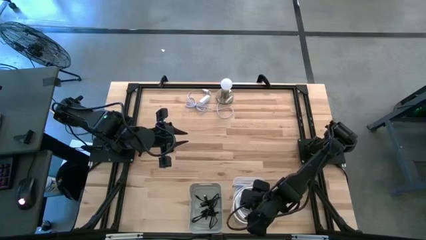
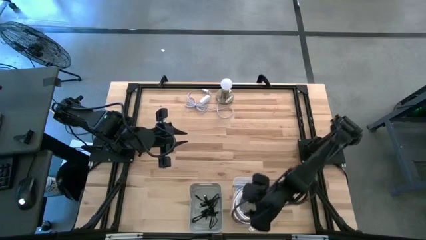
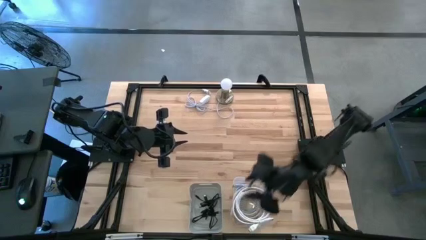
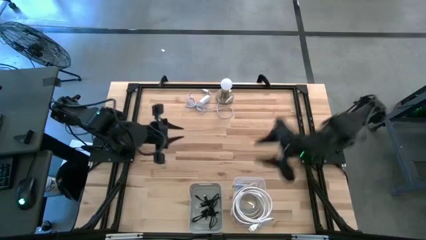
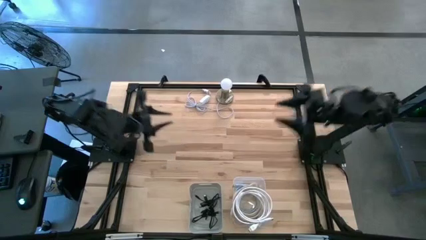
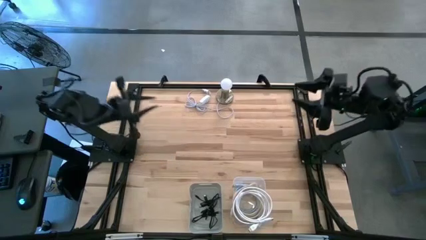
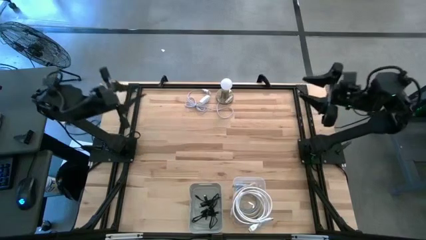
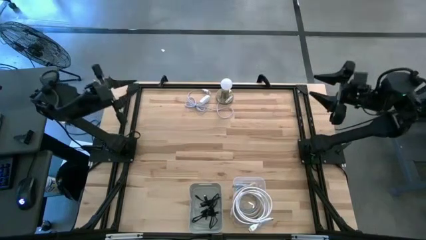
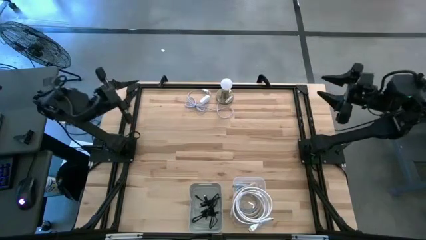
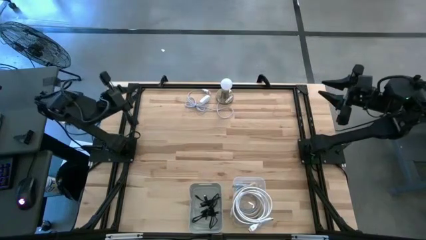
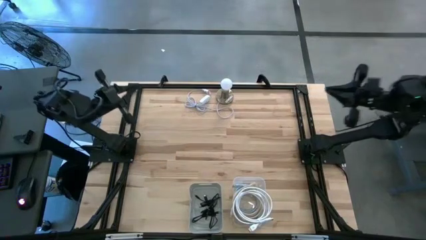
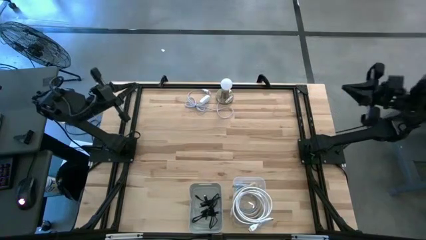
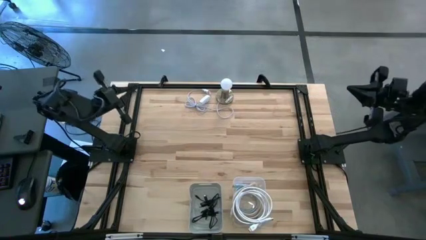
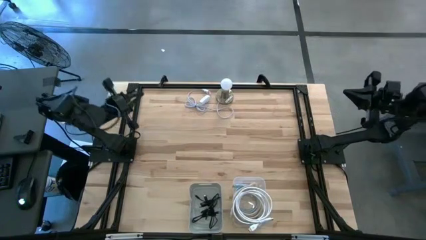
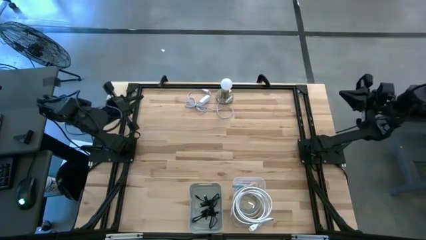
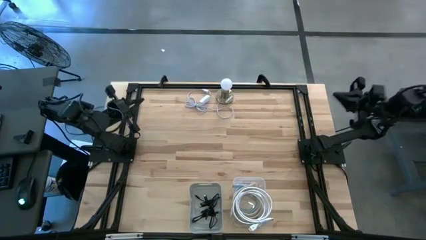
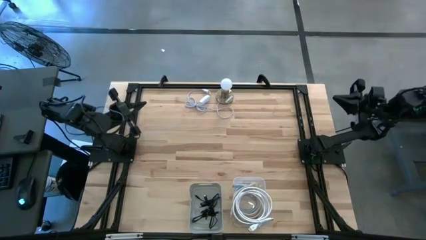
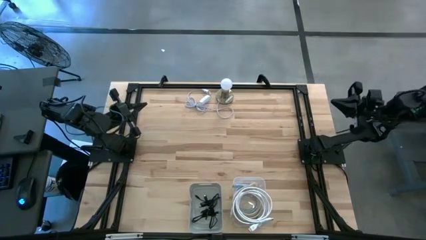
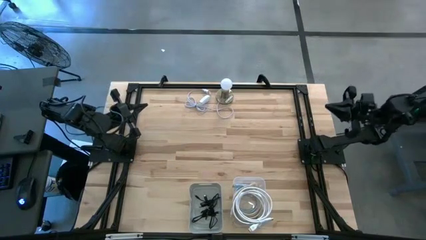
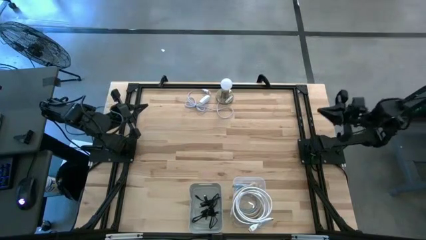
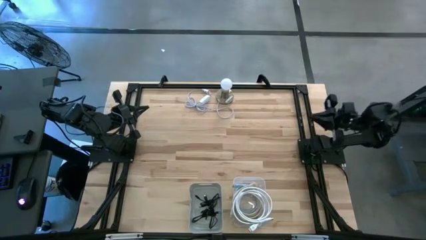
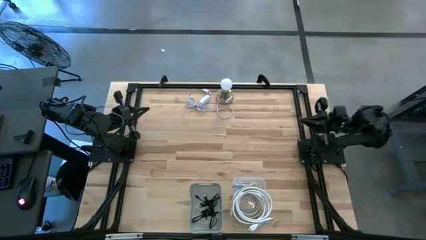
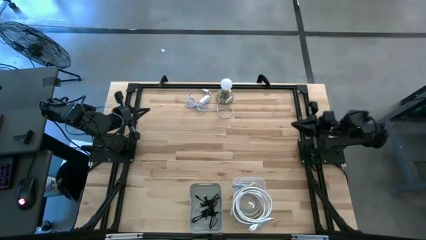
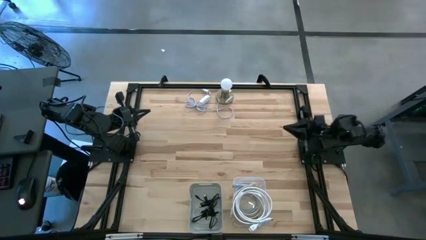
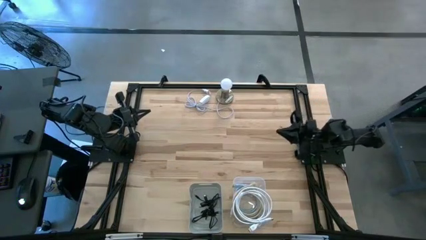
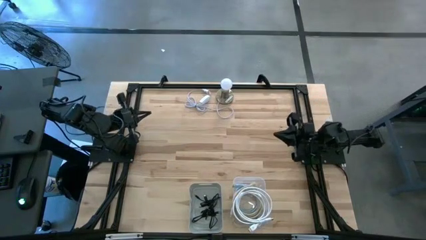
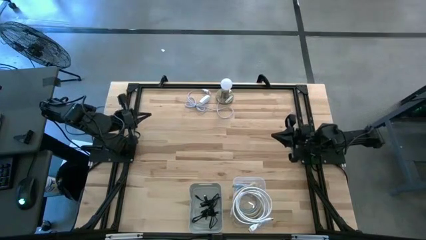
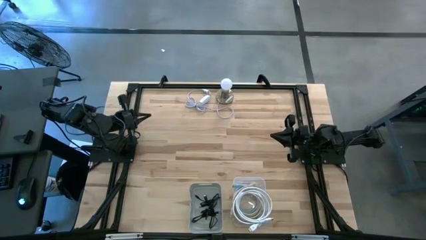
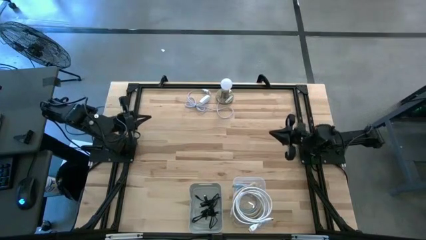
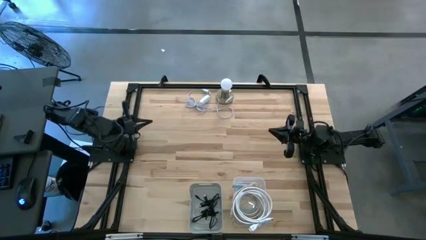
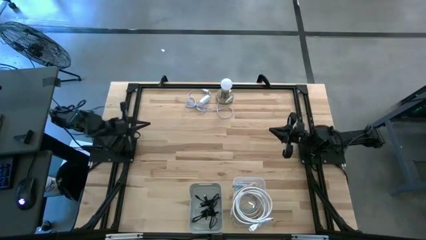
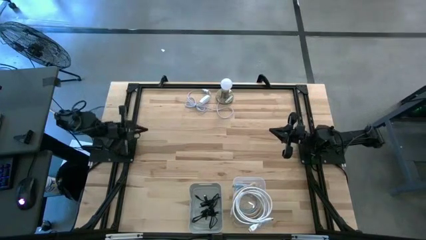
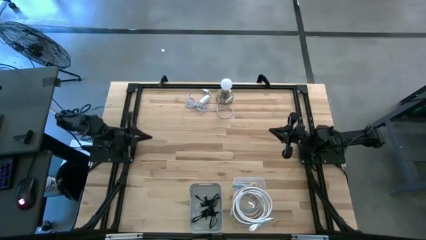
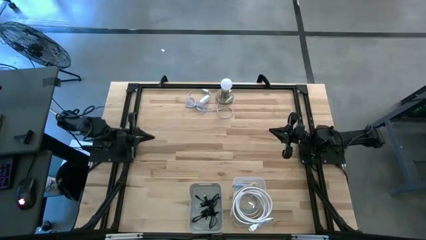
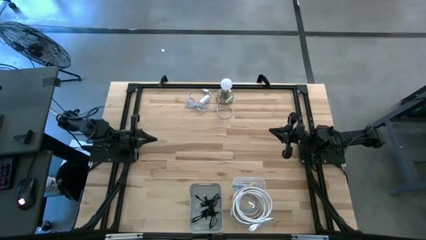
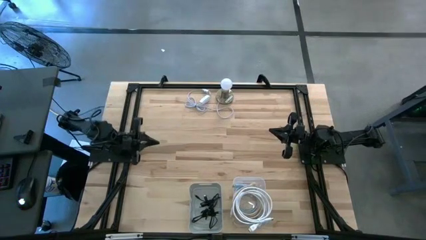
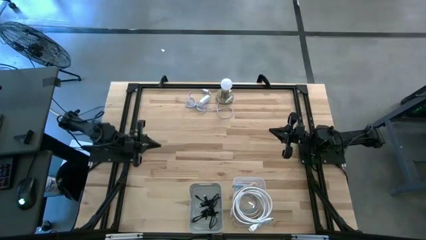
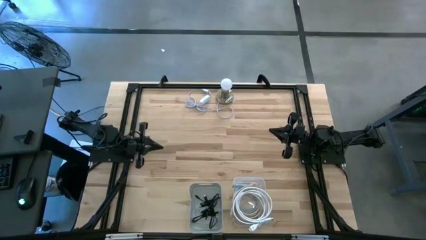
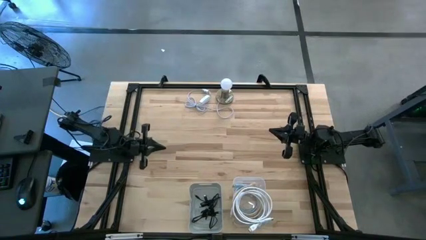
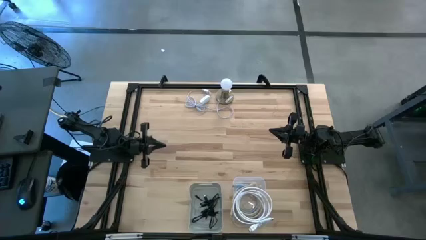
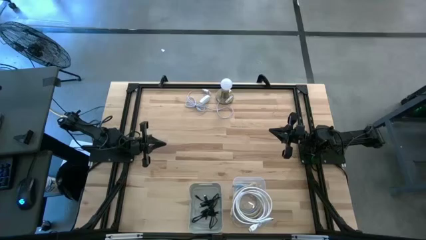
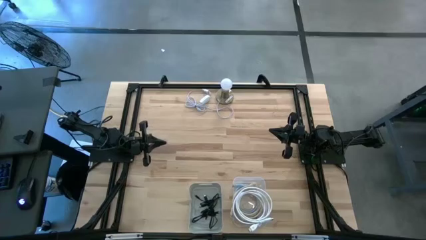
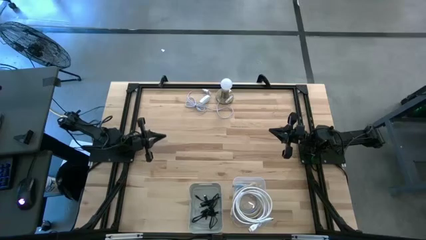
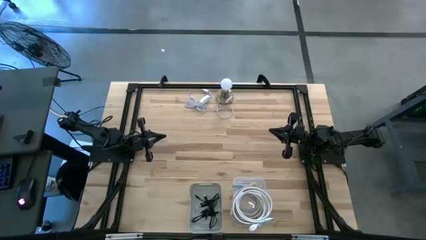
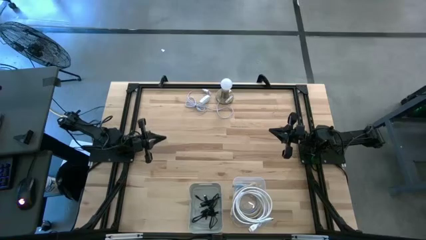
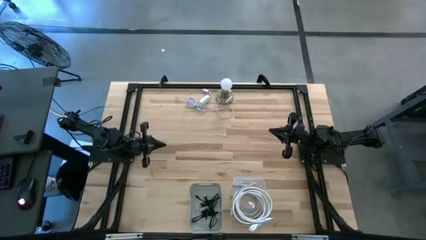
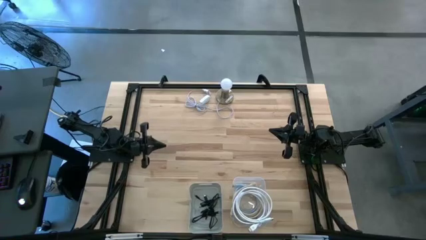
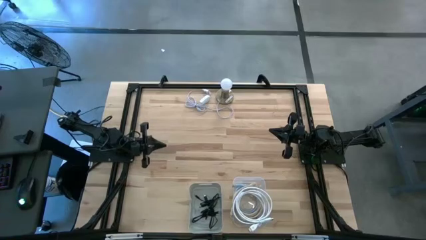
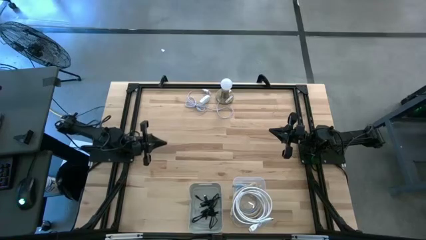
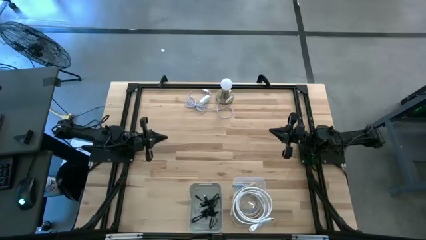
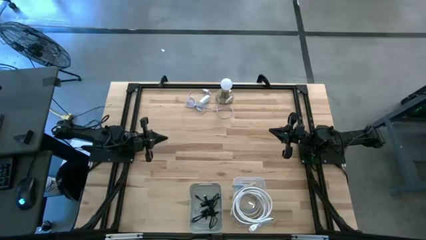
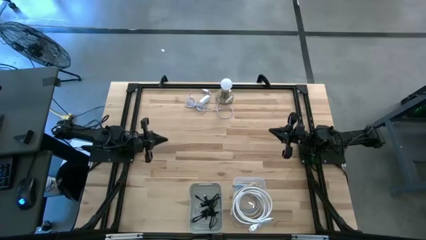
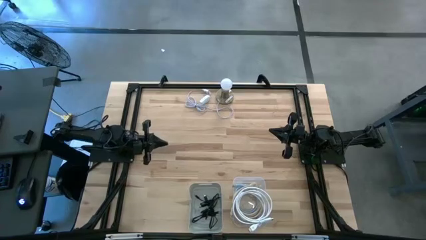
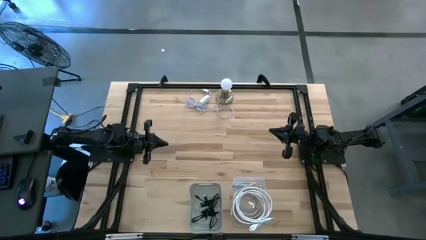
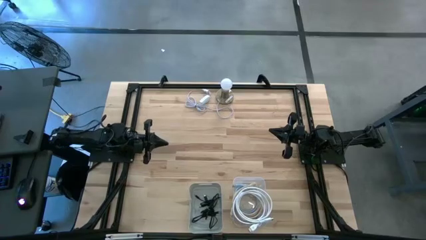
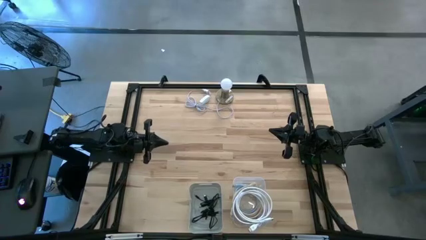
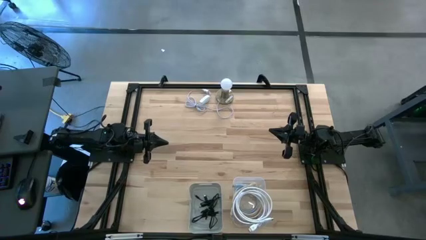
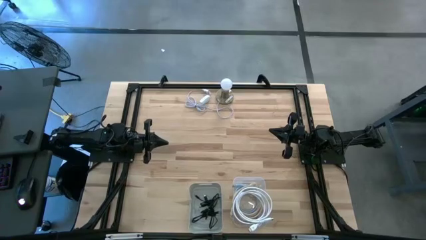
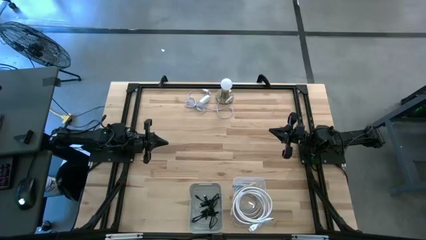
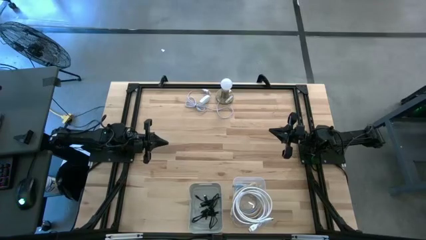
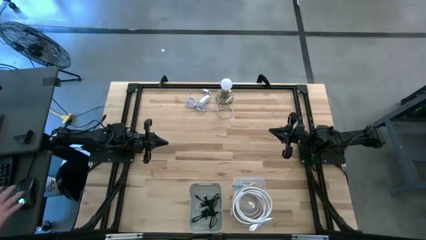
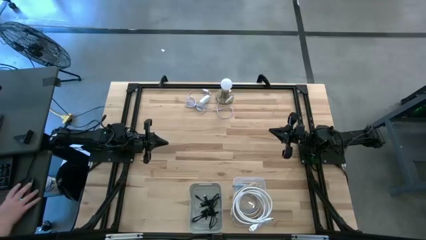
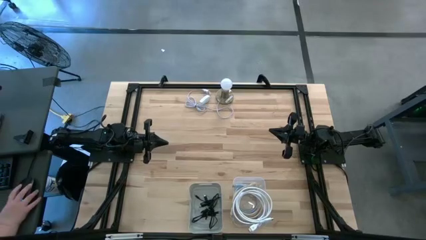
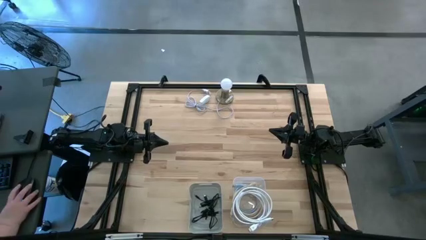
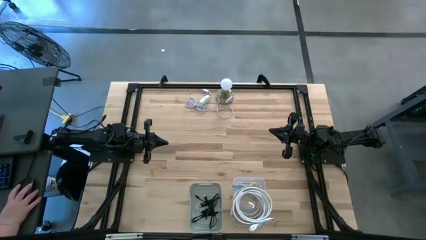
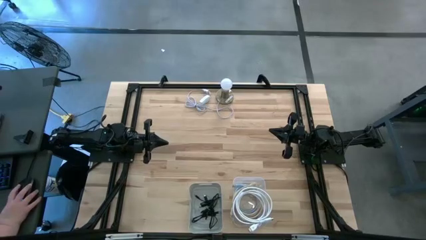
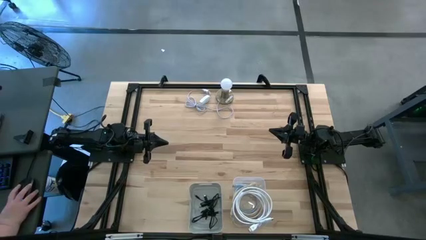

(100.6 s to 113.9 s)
Task: Pick & Place USB Port
Return to Home Position

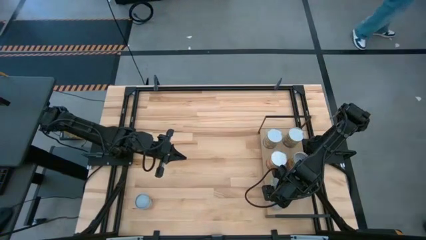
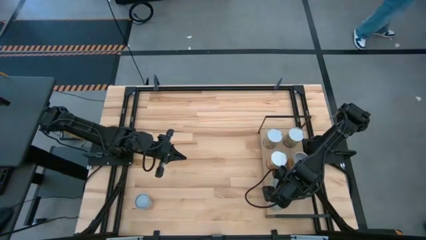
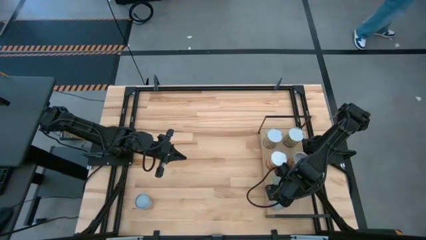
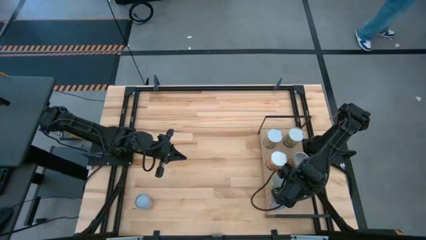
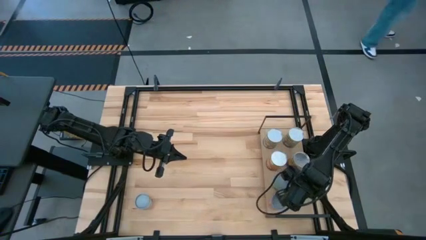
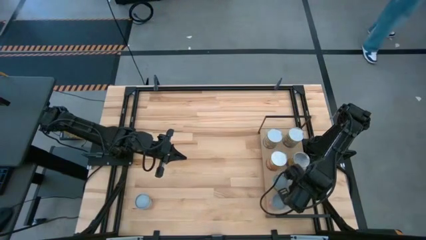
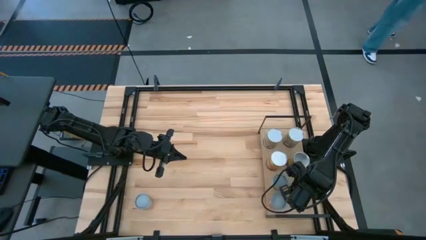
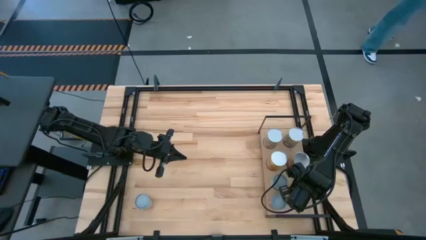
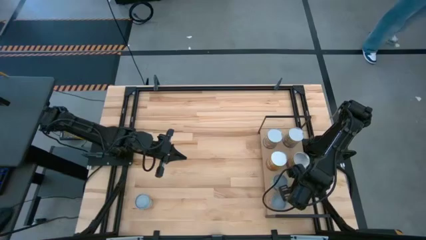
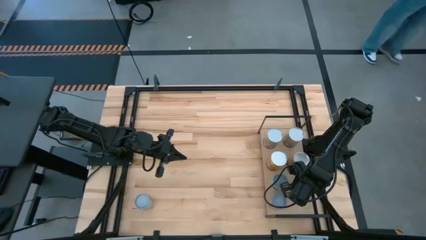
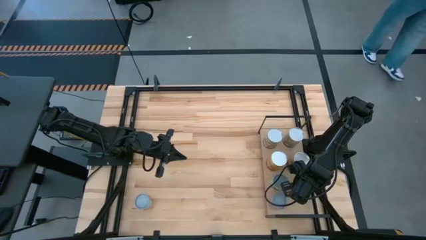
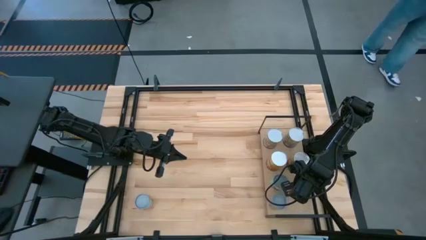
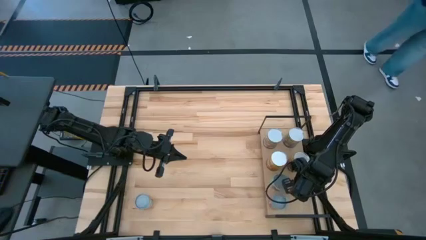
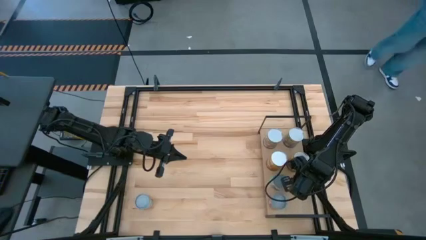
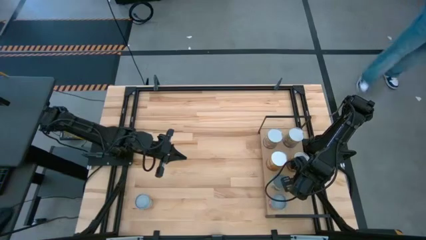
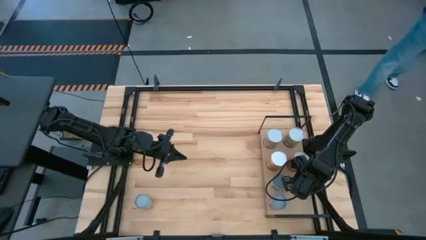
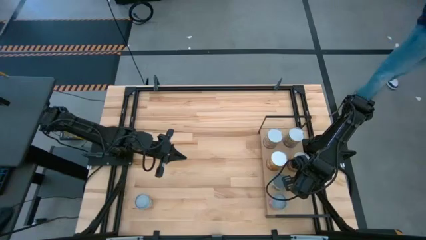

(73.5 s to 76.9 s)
Task: Pick and place cans onto a shelf
Adjust the small canned carrot
